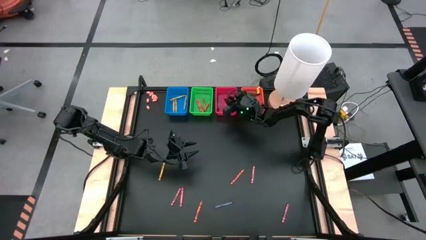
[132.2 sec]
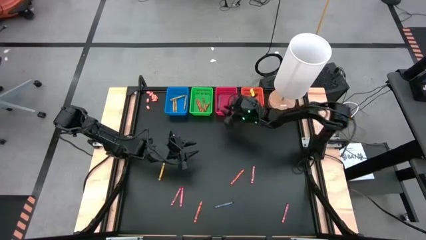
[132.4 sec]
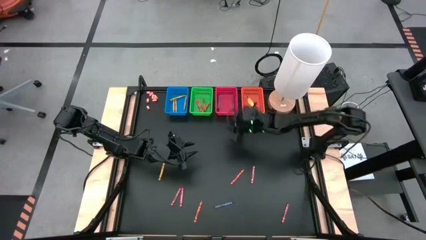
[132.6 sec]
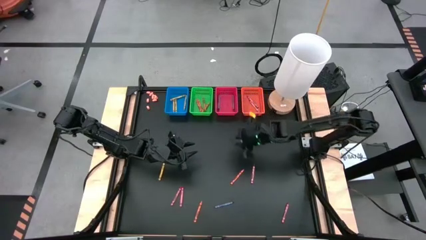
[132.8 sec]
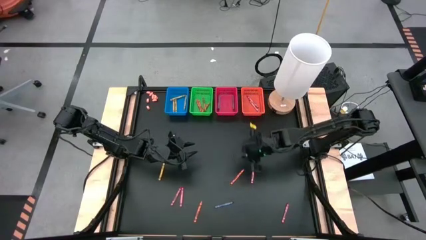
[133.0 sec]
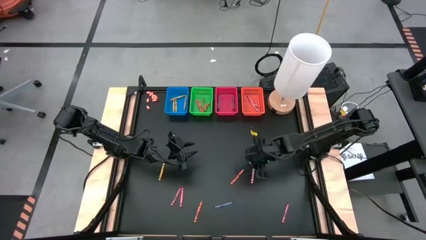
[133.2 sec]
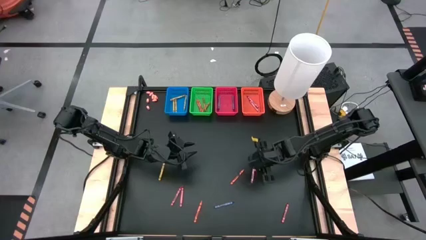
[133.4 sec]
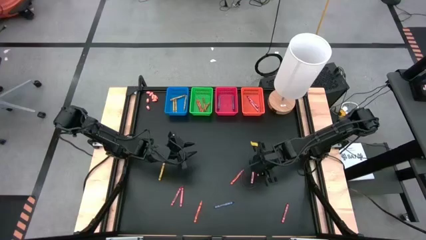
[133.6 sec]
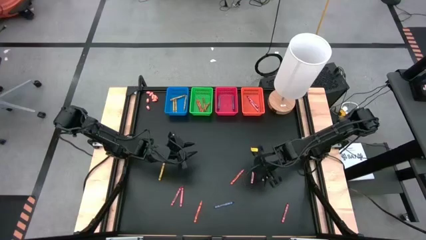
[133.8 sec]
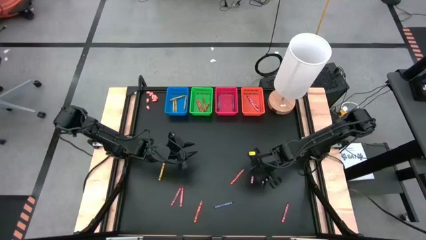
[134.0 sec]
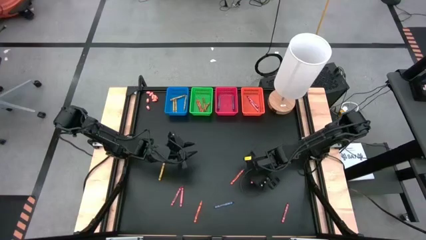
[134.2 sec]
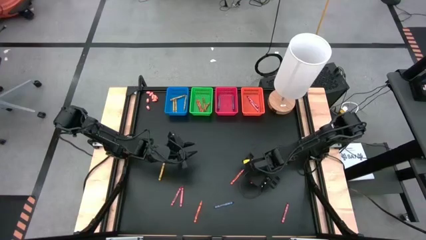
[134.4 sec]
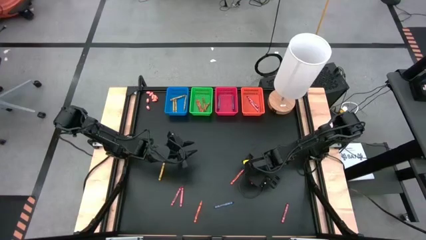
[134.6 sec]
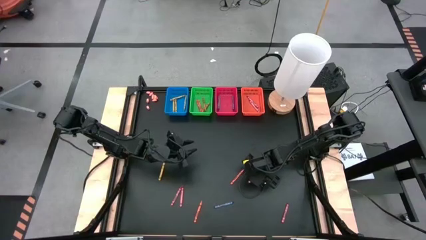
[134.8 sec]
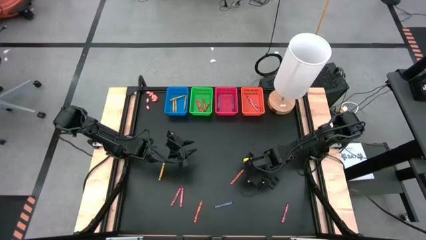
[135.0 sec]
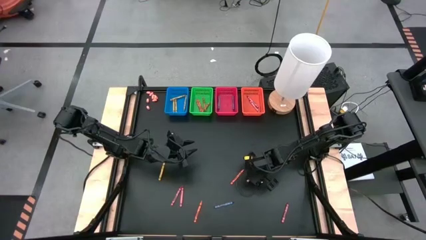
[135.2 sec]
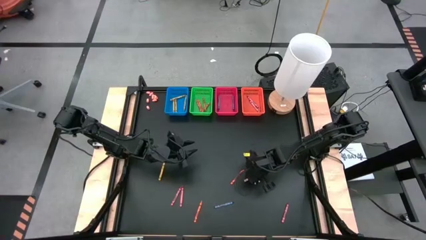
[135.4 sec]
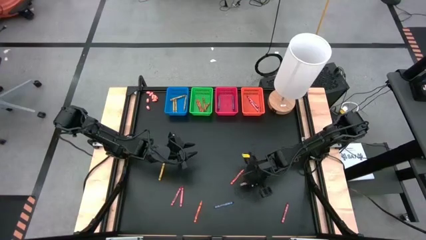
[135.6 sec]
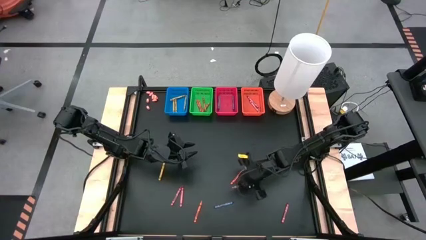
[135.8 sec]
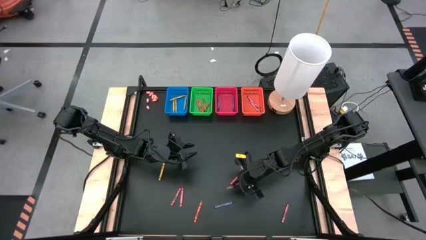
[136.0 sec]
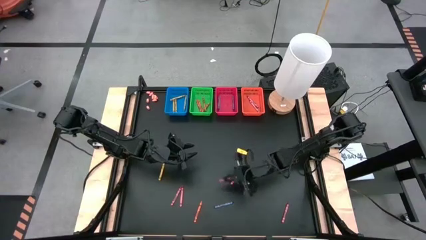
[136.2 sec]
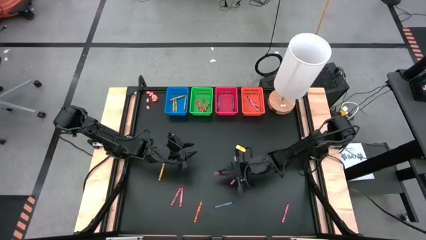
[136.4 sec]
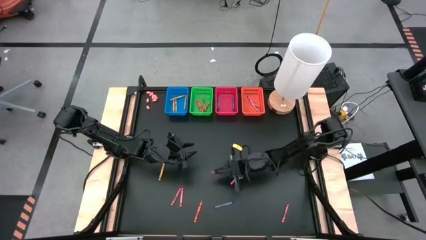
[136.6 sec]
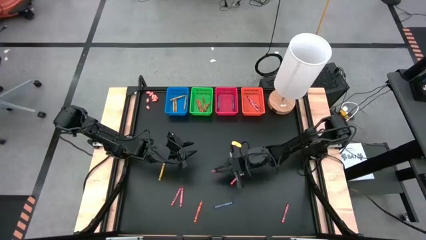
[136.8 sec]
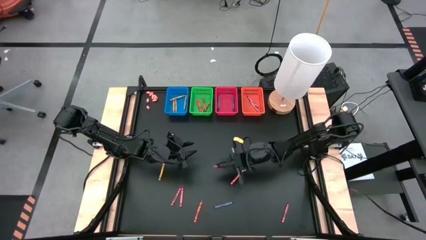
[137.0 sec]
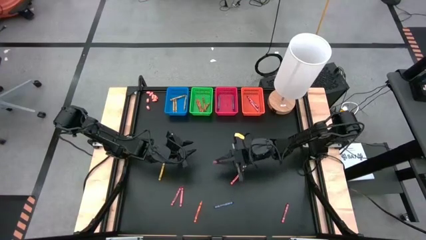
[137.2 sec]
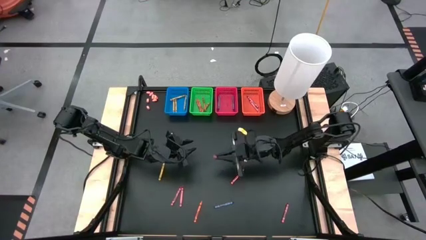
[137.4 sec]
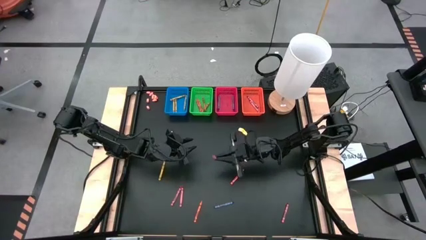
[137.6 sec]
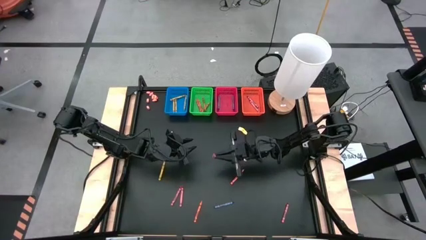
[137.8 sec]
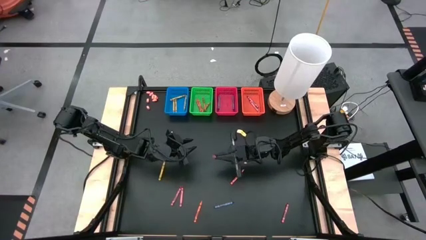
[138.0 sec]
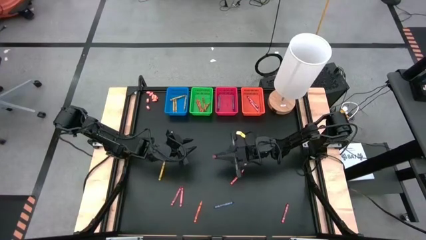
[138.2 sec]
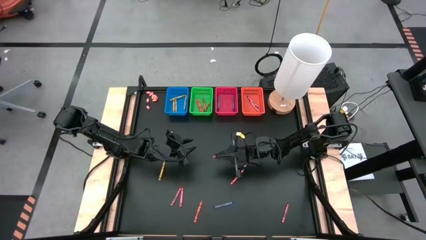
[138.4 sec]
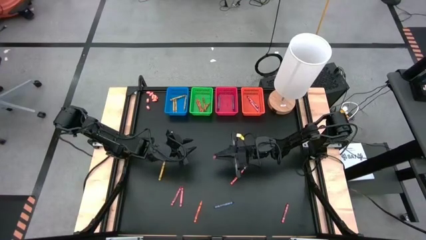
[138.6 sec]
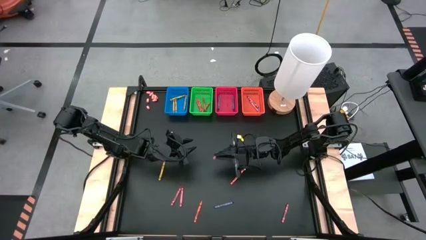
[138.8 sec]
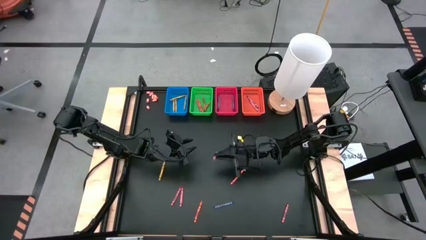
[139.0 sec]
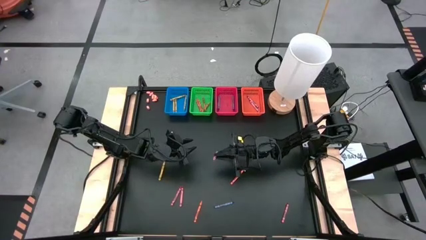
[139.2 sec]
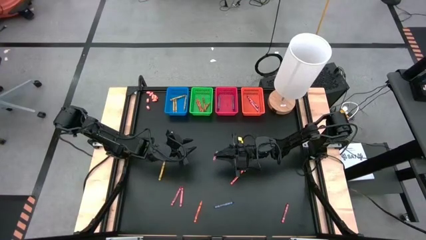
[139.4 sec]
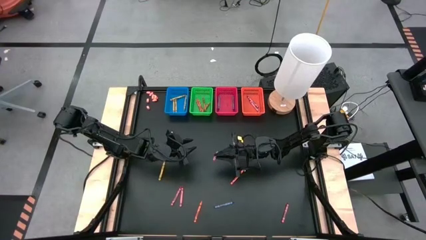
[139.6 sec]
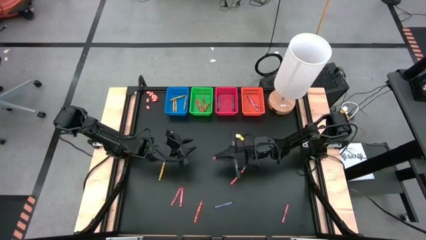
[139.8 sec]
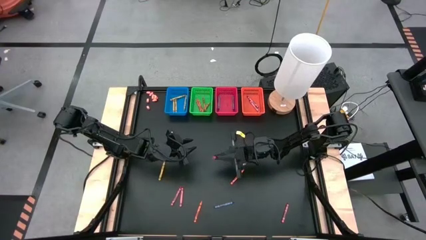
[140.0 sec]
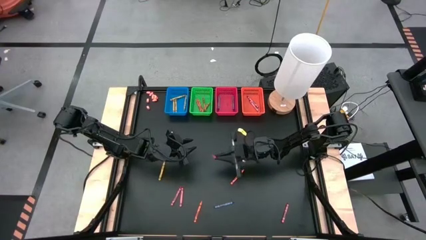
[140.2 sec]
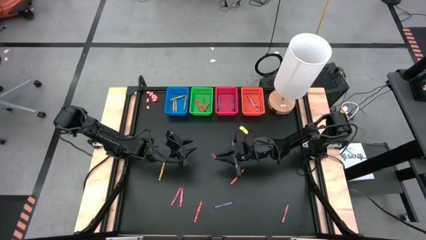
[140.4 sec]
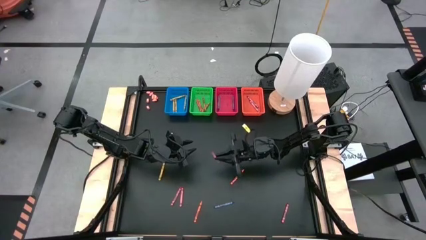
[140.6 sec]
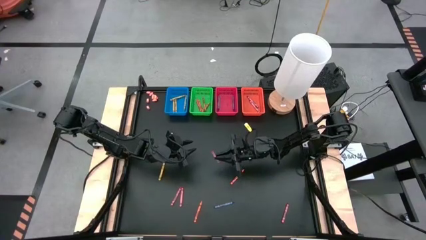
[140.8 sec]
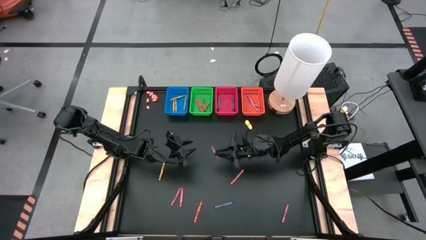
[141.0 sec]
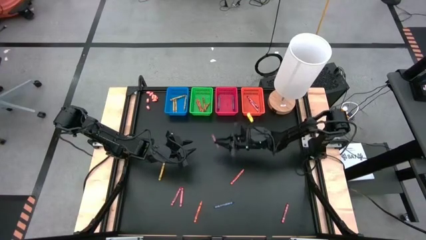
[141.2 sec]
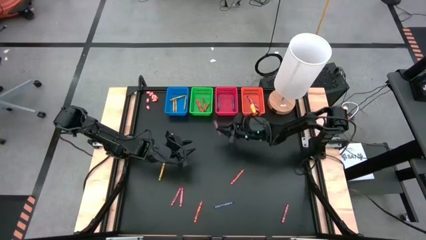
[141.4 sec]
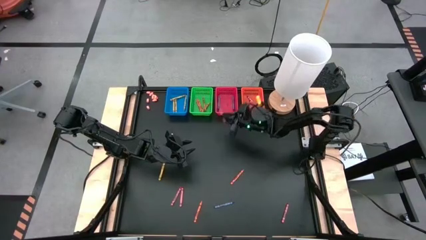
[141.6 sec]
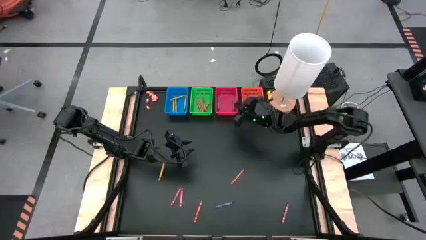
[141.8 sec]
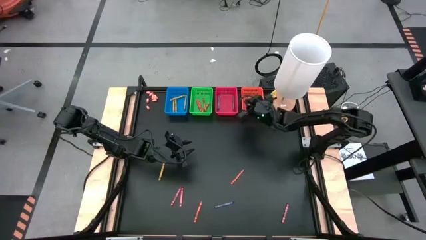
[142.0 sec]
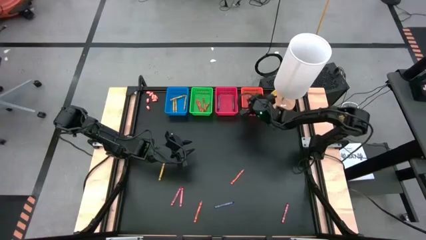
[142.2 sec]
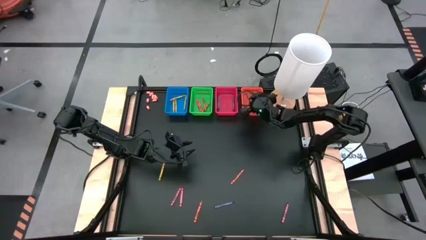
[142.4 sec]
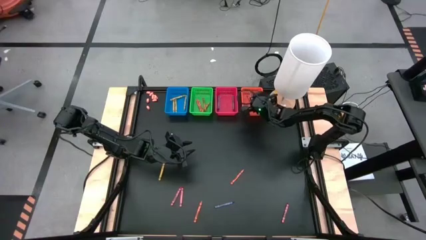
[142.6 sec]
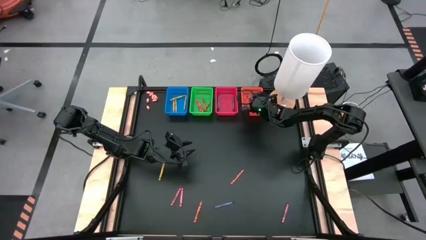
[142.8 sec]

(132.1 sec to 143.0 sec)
Task: Sort crayons
Put the red crayon into the orange bin

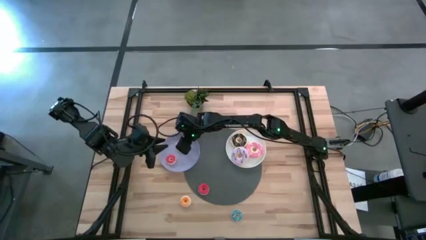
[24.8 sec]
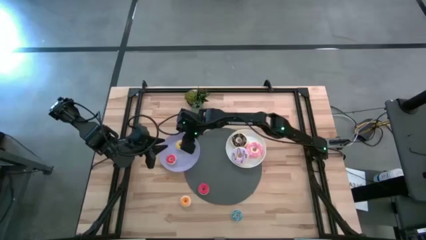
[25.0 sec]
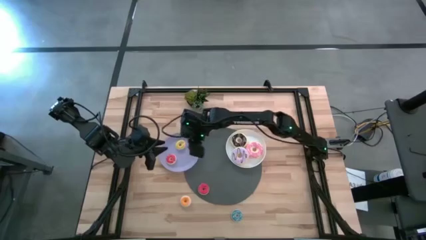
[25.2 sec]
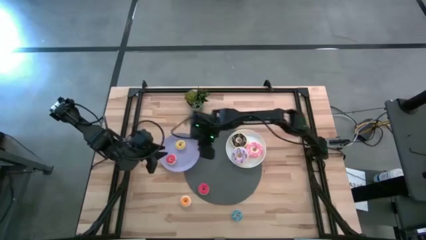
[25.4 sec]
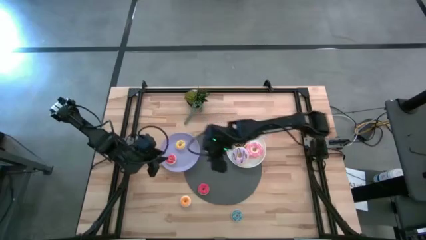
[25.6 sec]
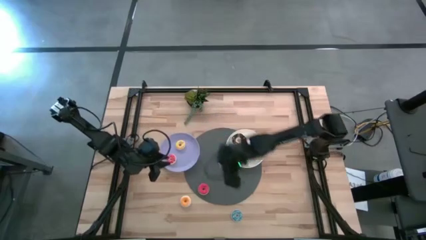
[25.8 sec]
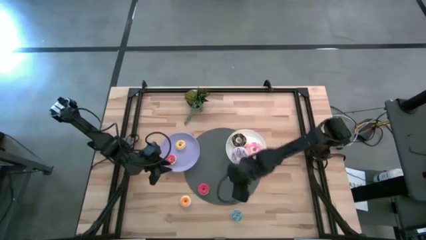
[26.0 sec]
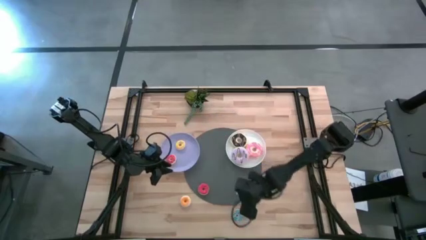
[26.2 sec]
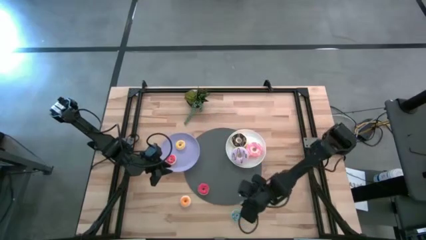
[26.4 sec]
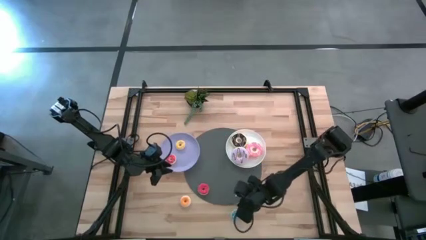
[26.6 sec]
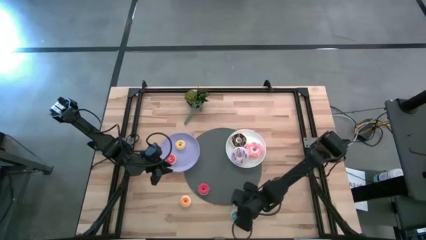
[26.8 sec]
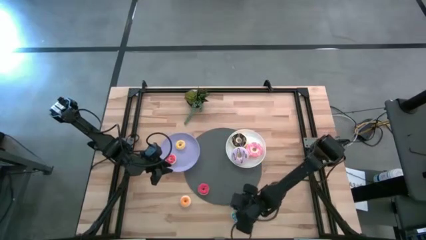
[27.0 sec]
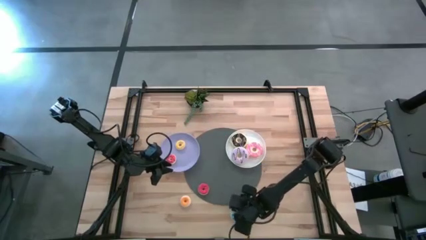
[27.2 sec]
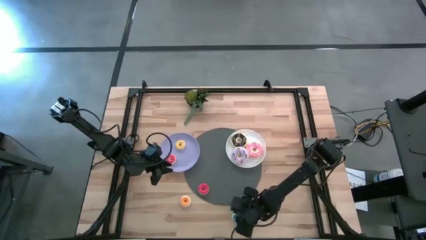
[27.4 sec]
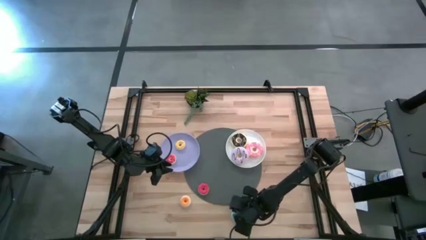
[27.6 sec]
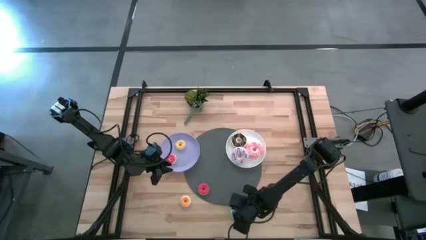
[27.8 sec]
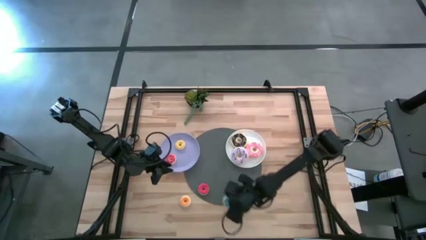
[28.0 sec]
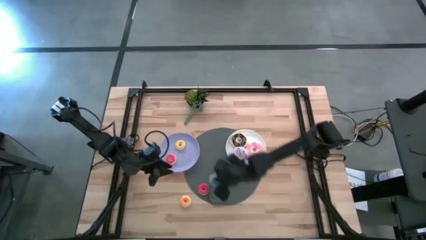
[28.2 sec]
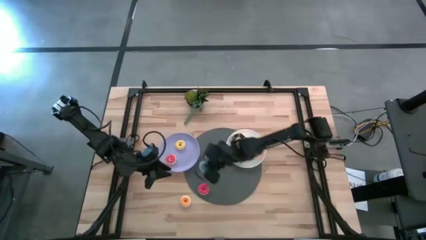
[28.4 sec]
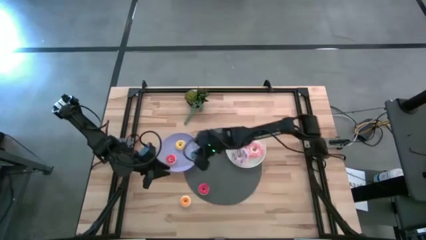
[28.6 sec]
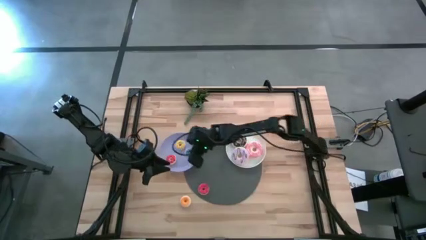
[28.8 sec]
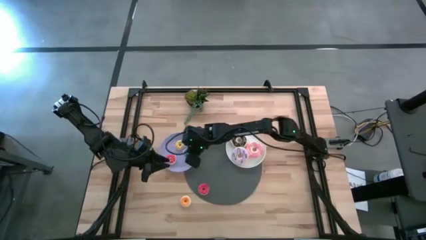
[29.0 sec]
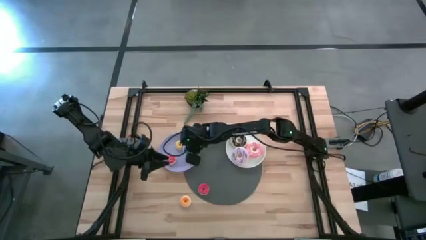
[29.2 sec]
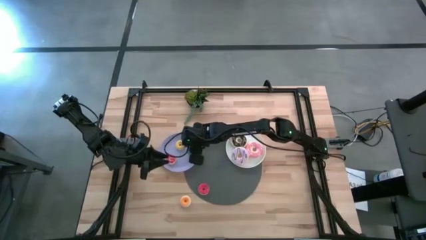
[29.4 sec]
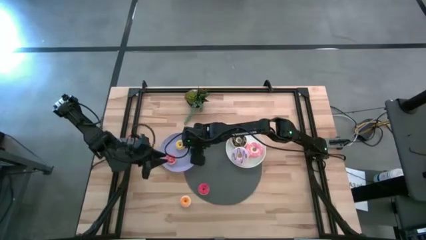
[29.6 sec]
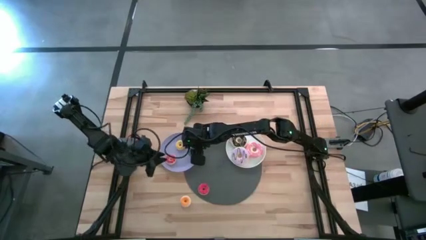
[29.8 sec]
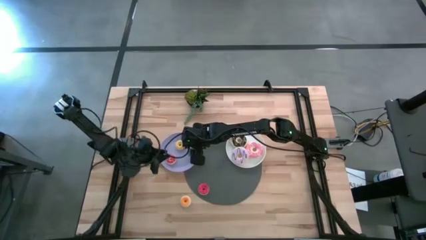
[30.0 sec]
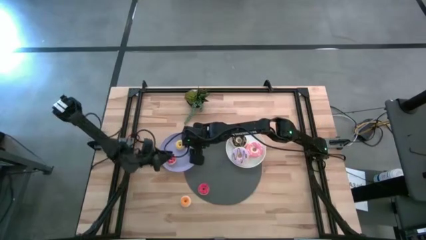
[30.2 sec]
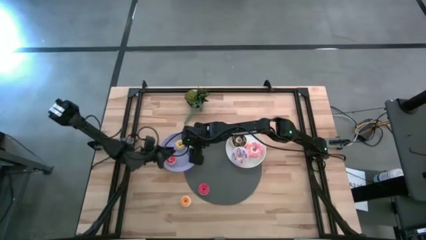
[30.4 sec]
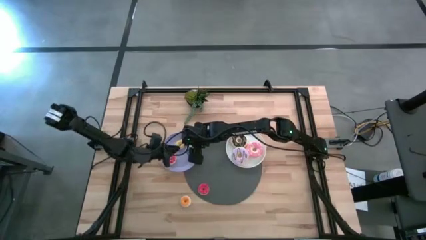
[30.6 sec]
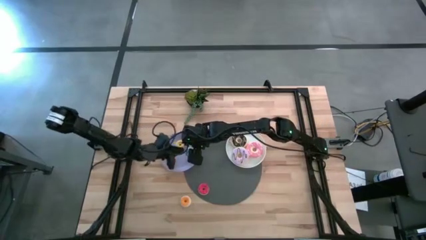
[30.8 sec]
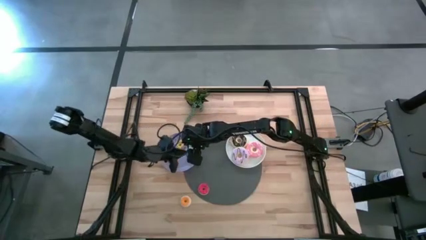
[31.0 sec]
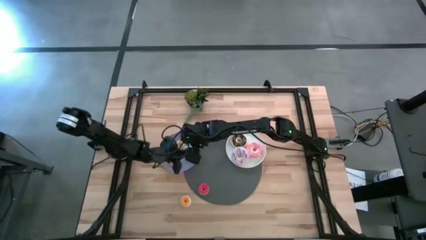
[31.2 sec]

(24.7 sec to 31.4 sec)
Task: Pick & Place donuts
Put the small blue donut on the purple plate
